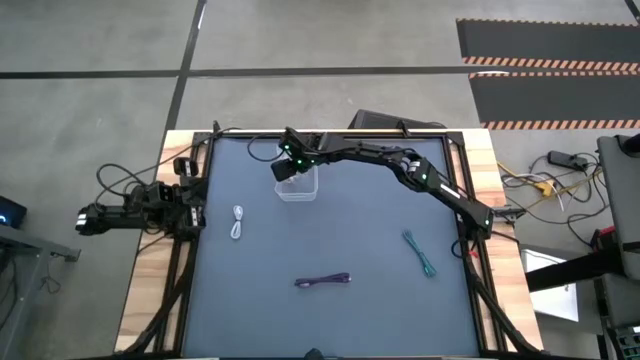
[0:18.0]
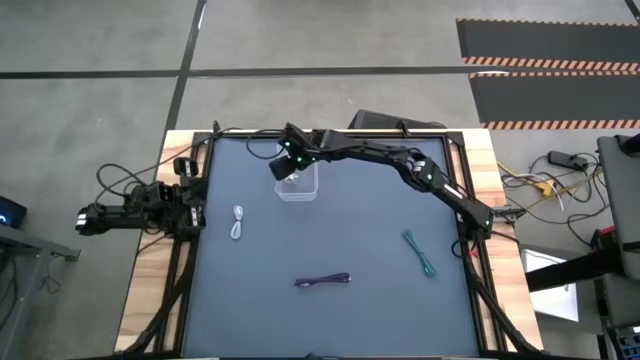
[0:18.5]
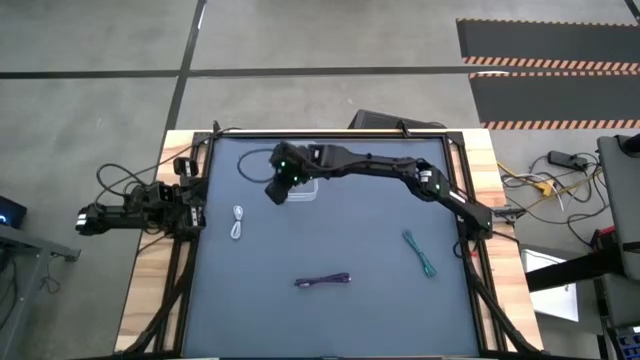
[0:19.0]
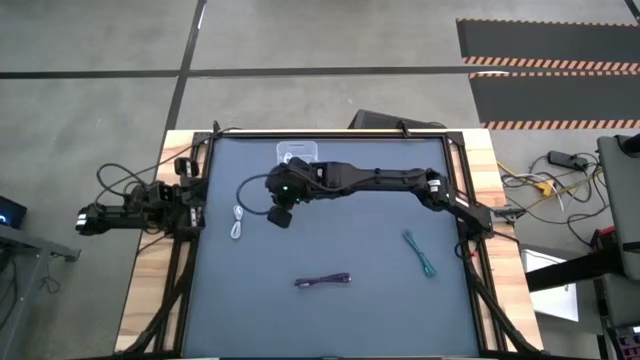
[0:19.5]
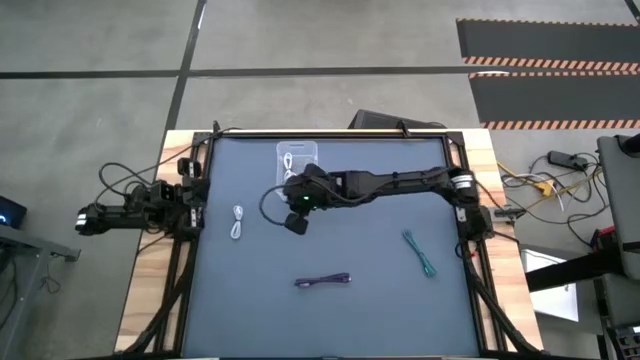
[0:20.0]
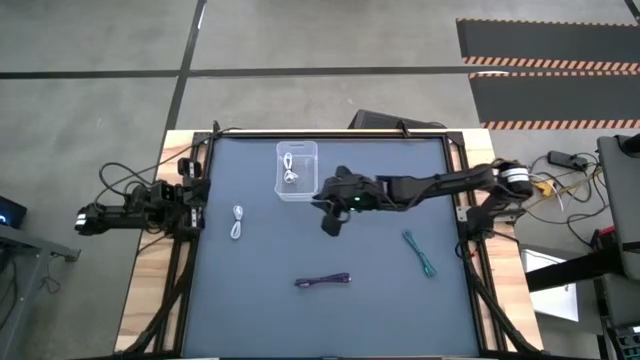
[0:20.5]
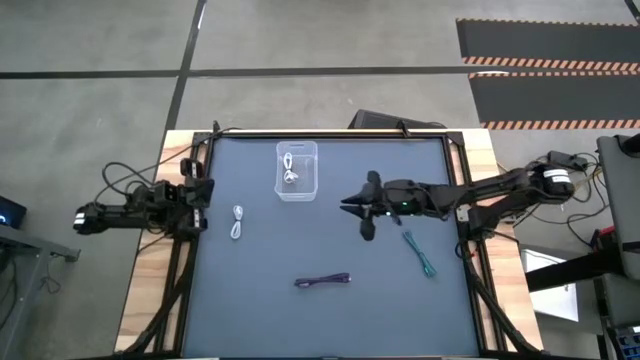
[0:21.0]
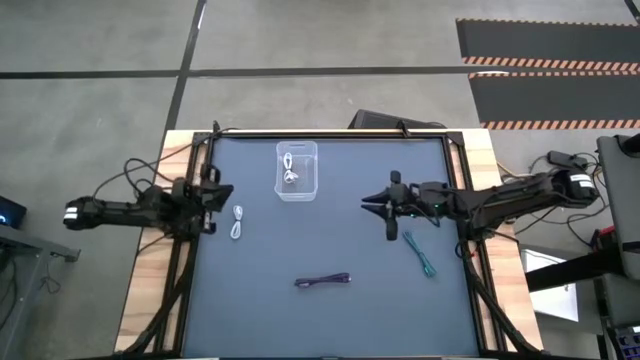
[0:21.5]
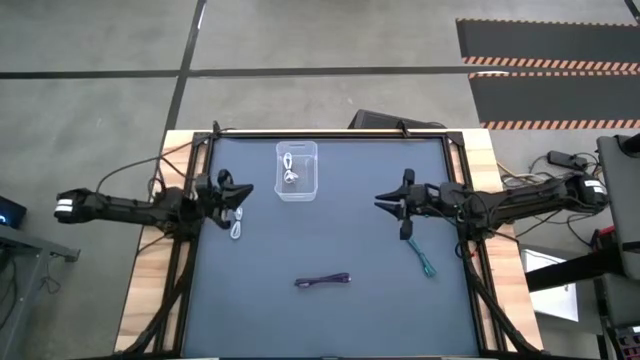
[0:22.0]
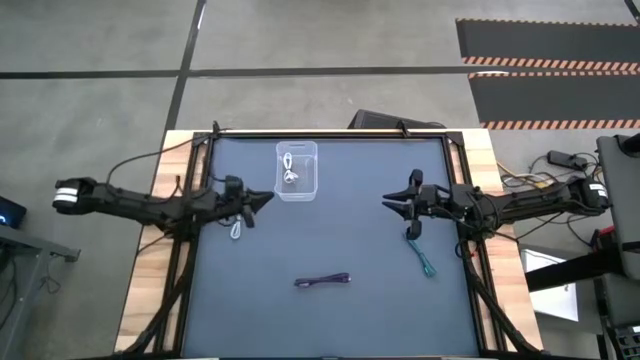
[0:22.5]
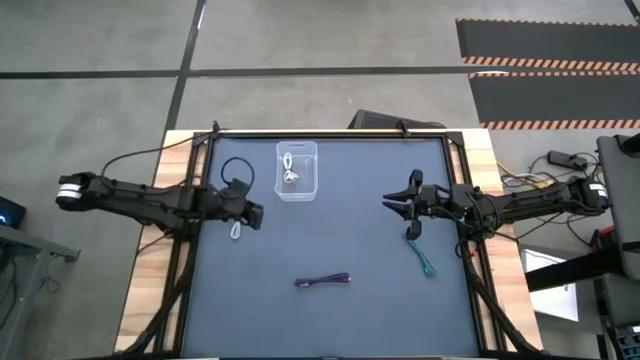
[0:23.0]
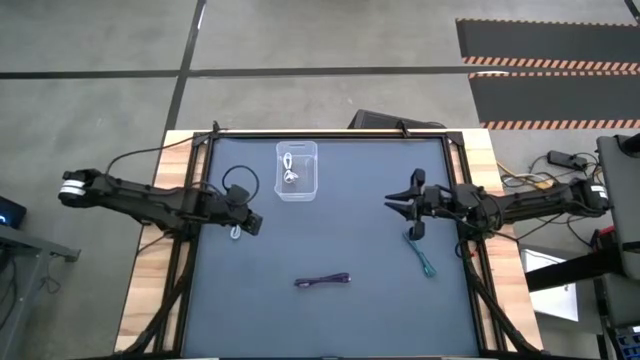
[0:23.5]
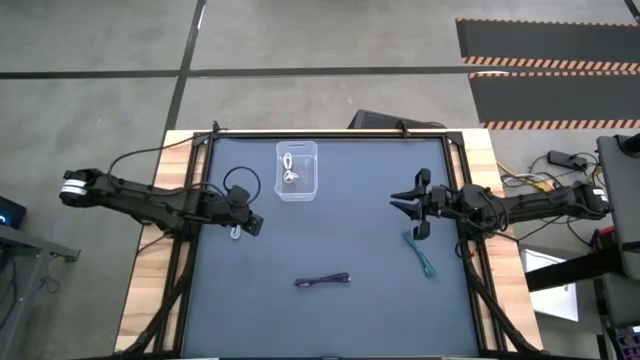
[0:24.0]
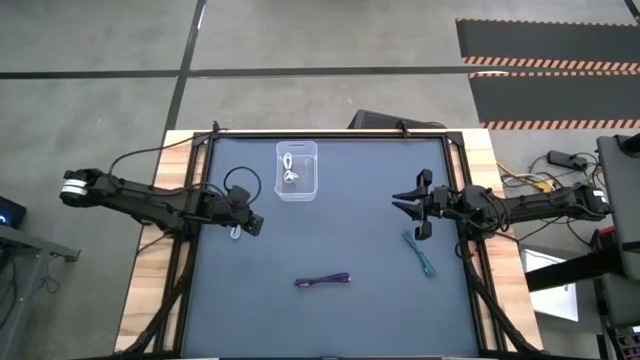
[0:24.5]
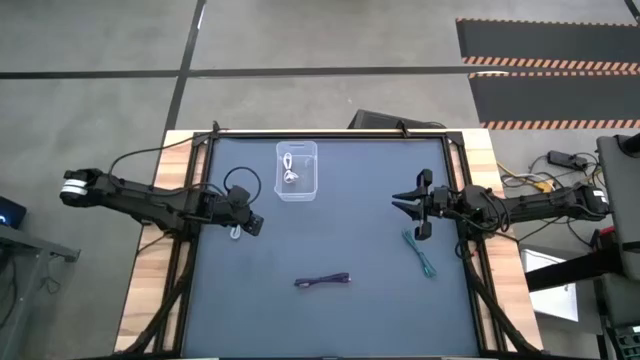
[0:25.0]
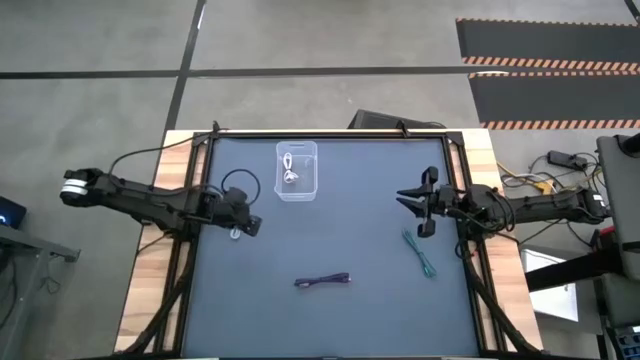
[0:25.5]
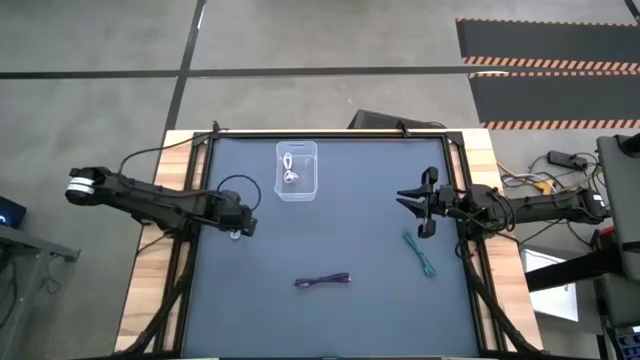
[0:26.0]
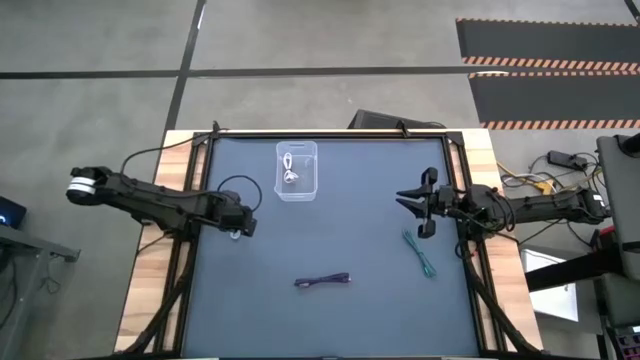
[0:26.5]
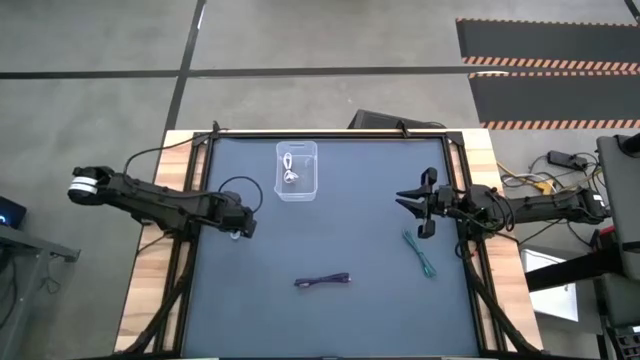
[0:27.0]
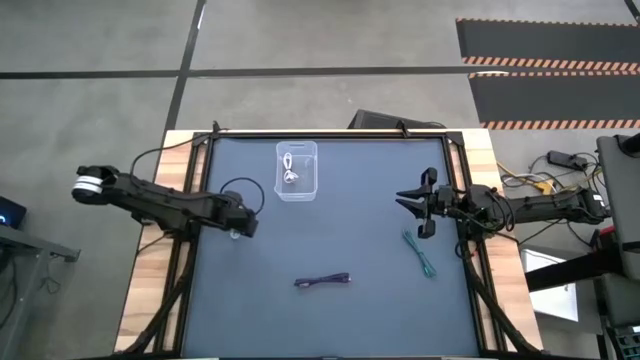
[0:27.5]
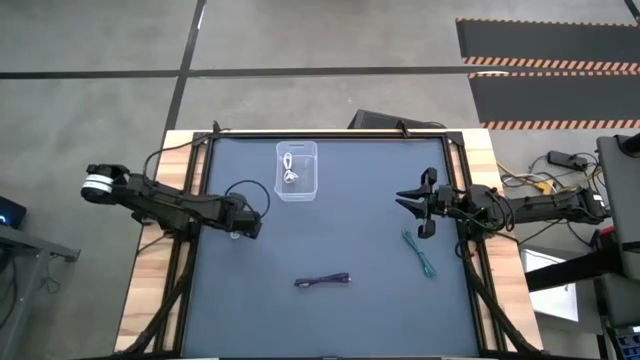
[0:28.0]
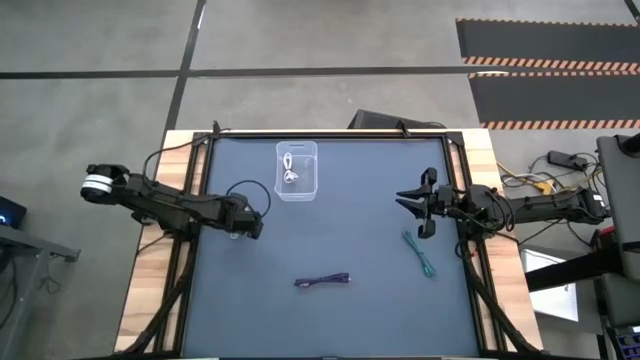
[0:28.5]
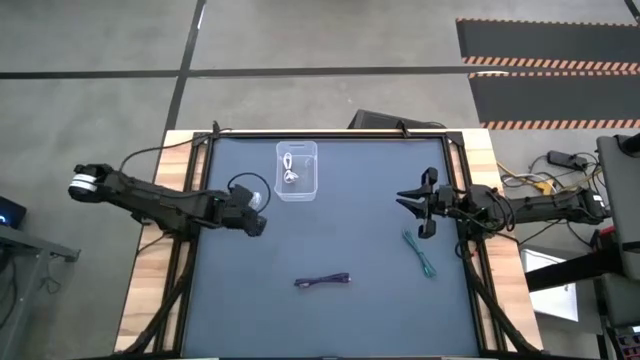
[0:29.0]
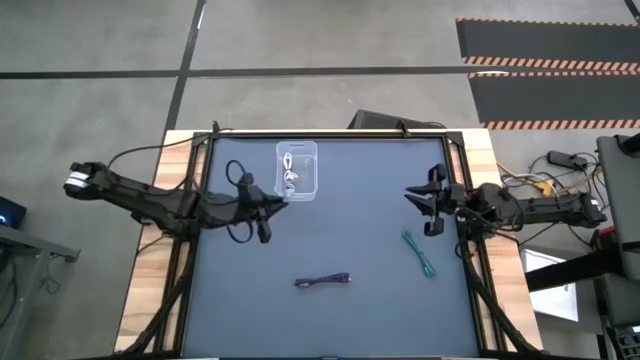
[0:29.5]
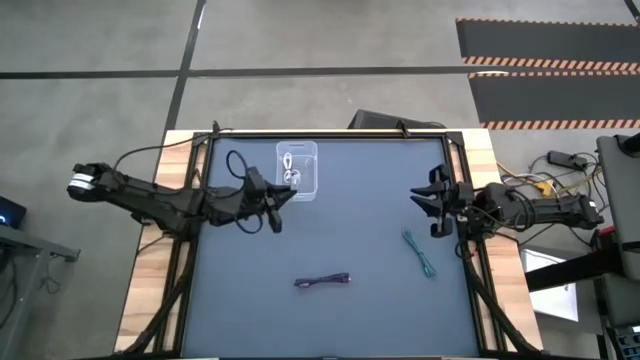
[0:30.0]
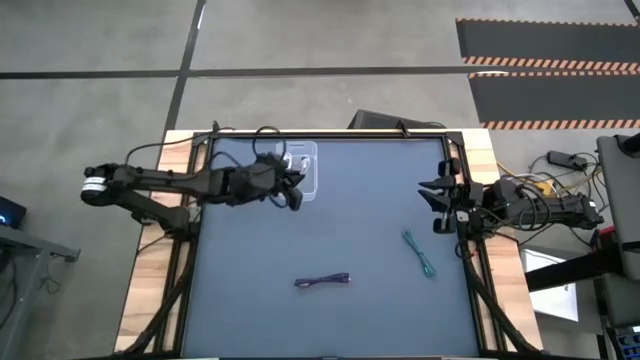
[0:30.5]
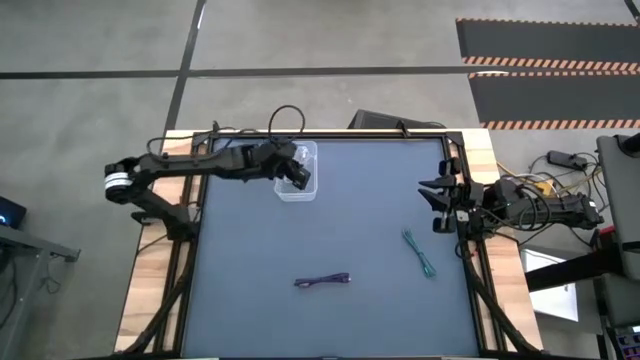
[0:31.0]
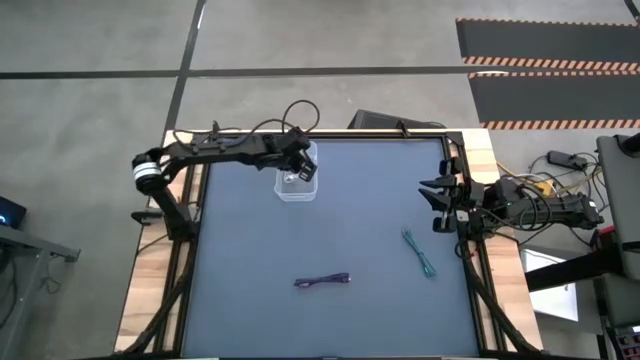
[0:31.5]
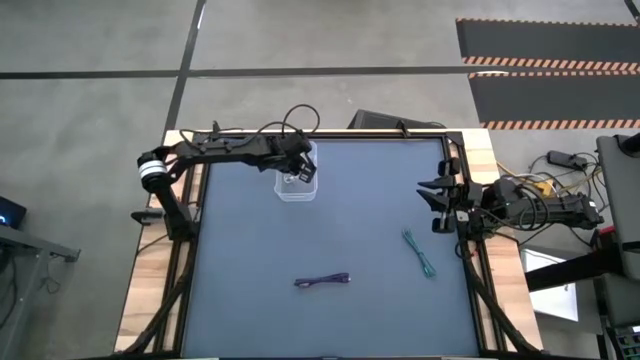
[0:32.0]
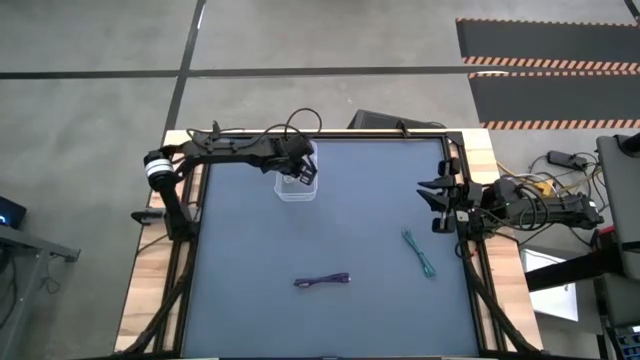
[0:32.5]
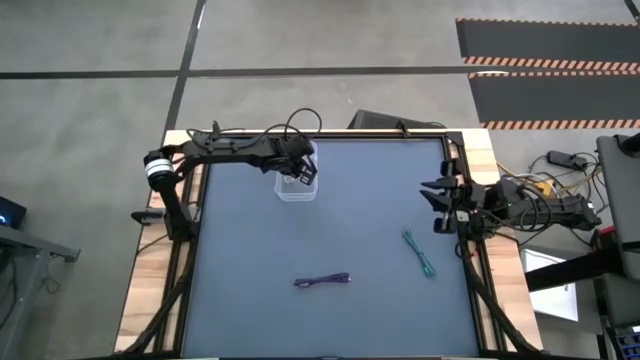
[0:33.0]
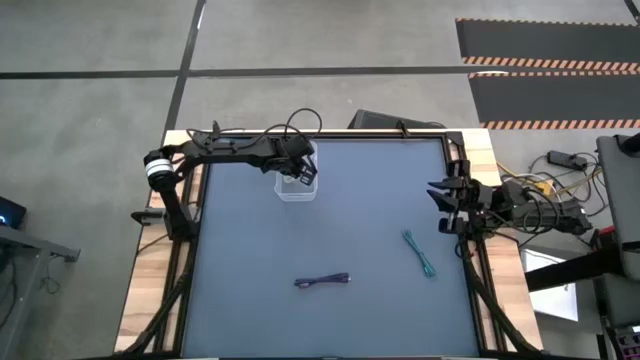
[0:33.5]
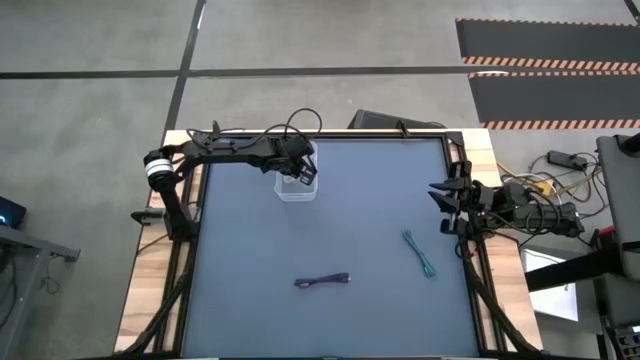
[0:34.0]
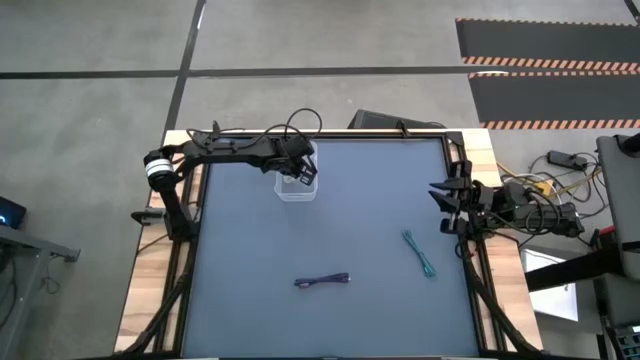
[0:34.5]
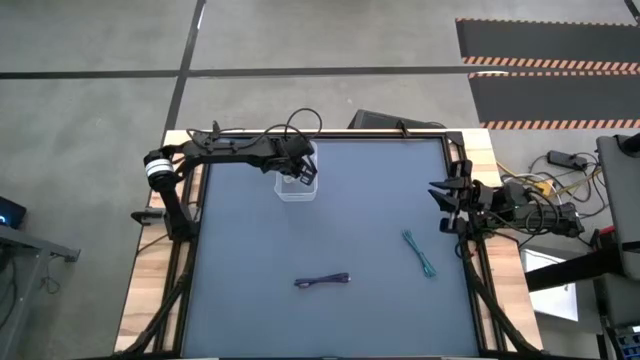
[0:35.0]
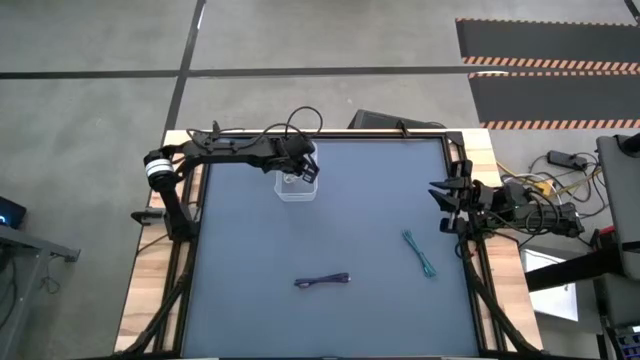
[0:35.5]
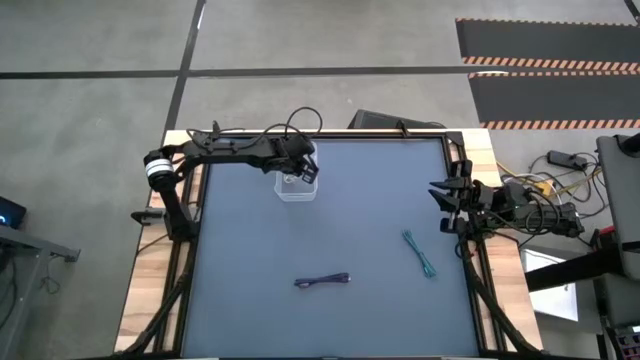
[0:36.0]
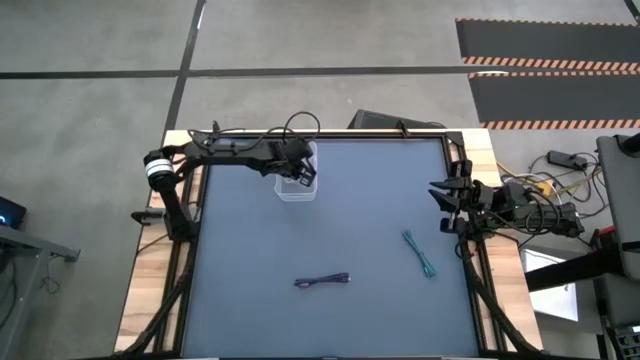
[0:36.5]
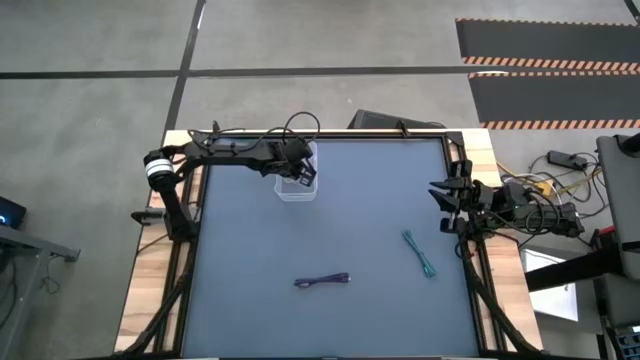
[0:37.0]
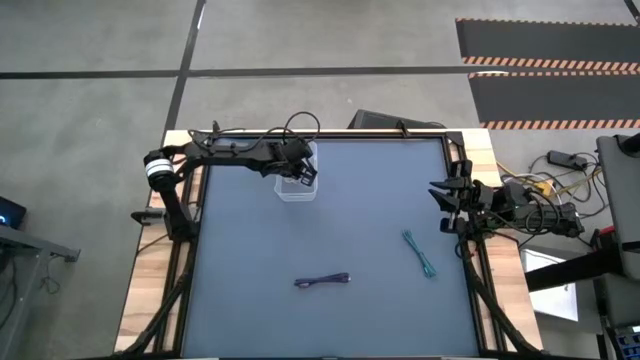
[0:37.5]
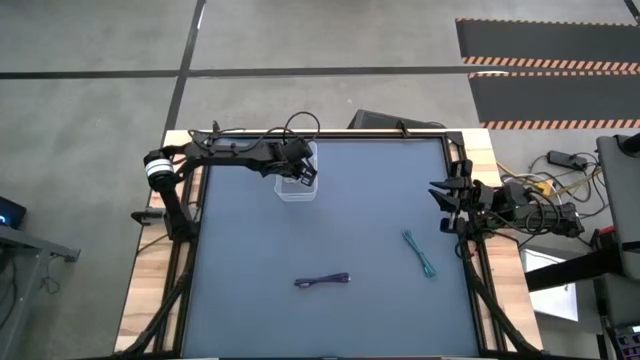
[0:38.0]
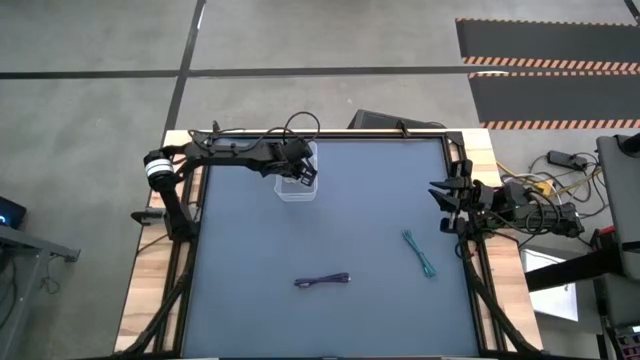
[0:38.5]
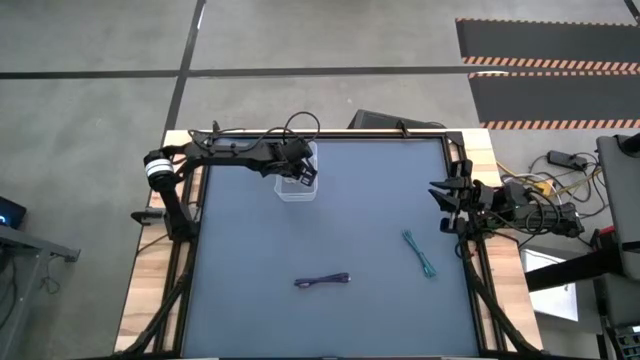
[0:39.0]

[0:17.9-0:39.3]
Task: Pick and place USB-C Cables
Put the white charger cable into the transparent bin
